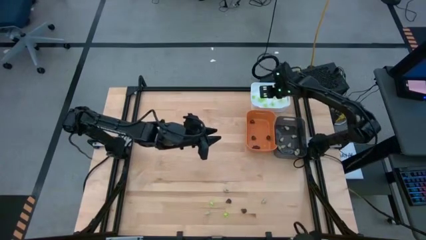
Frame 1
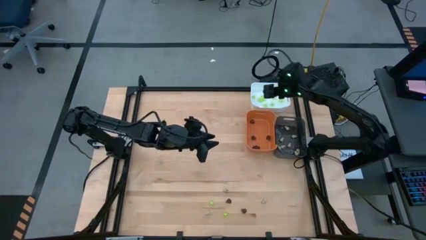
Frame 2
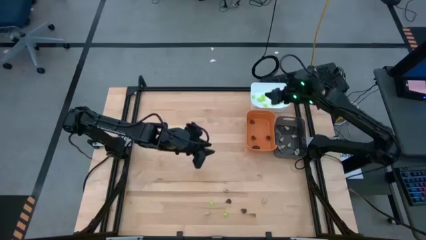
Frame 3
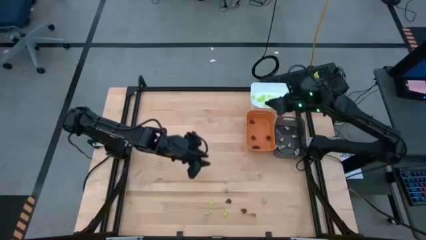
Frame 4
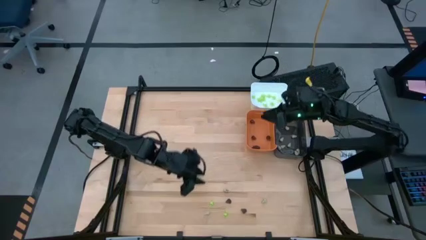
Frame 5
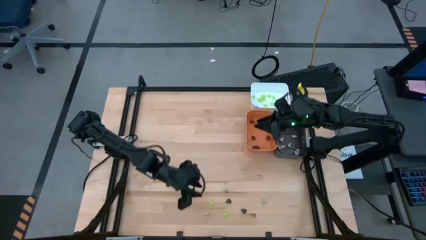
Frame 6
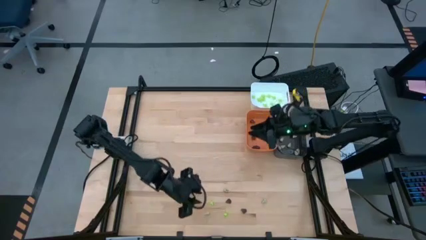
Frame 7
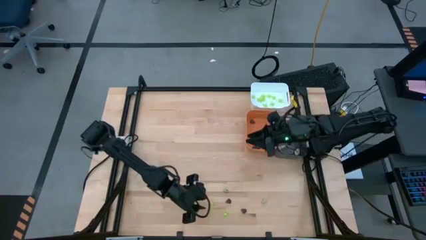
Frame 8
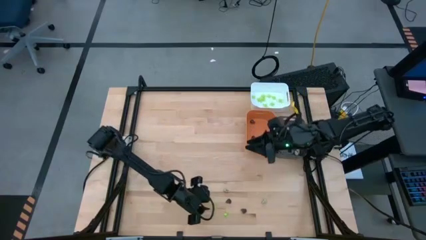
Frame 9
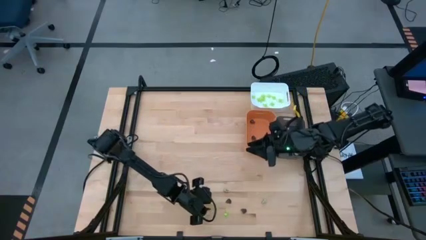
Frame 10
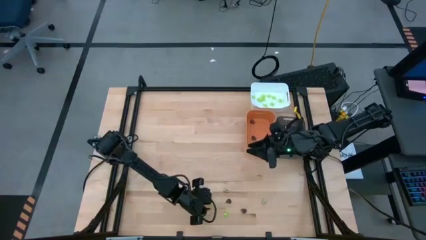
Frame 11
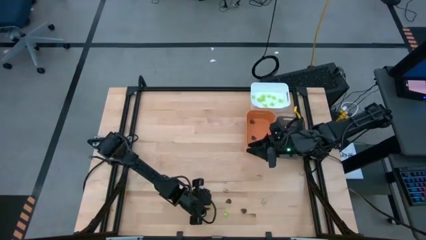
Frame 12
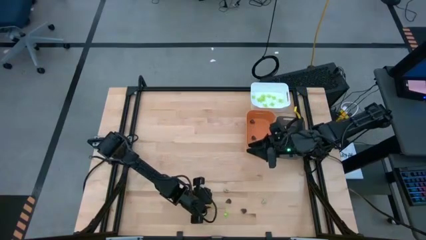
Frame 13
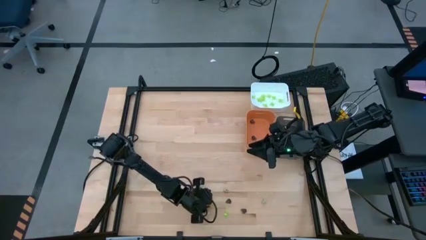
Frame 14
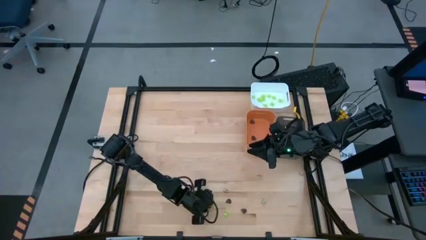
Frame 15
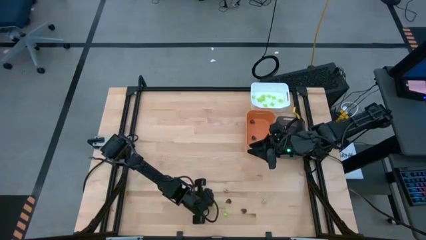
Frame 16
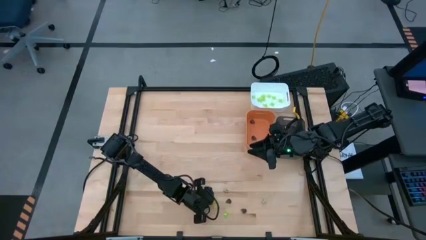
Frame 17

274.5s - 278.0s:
Task: Sort Halloween decoration
Put the green spider toy into the white bin

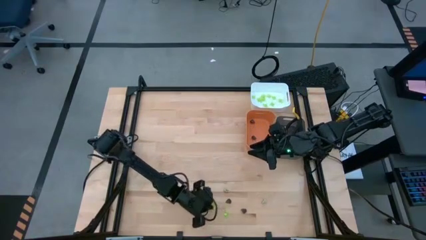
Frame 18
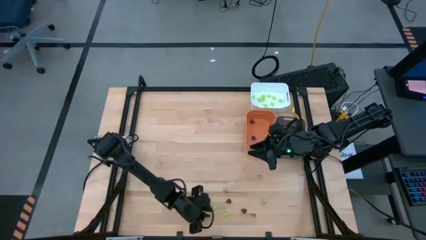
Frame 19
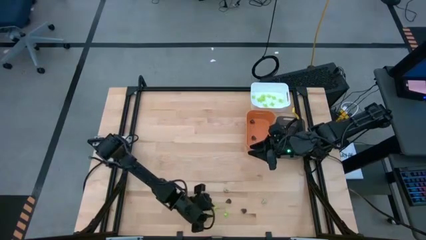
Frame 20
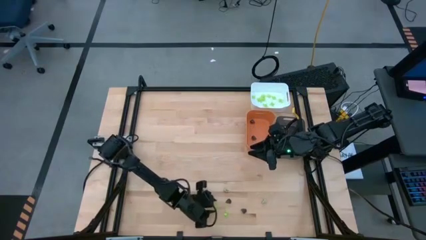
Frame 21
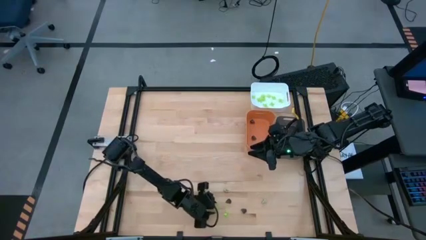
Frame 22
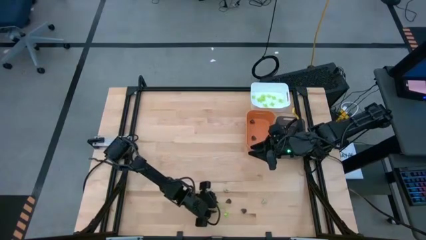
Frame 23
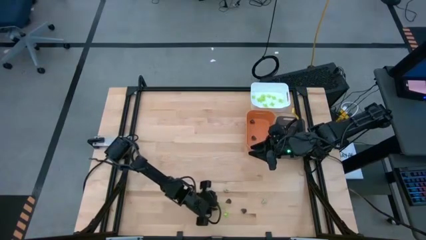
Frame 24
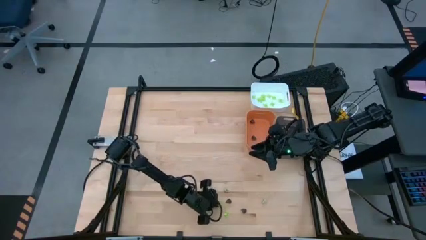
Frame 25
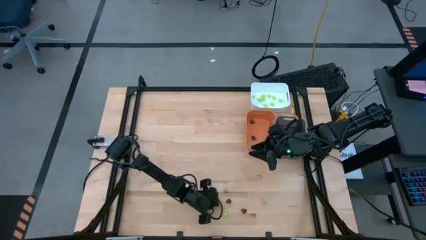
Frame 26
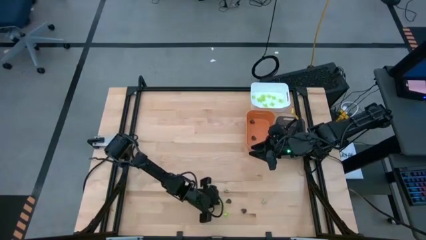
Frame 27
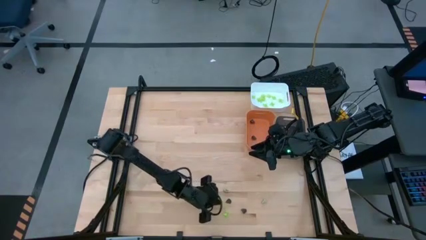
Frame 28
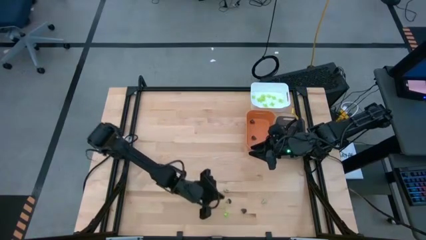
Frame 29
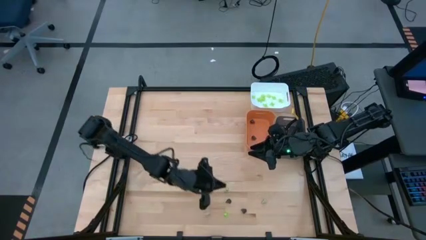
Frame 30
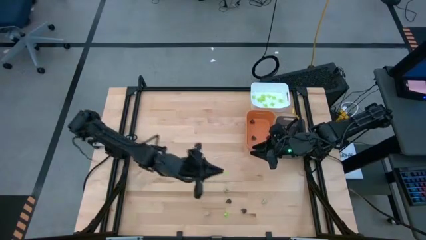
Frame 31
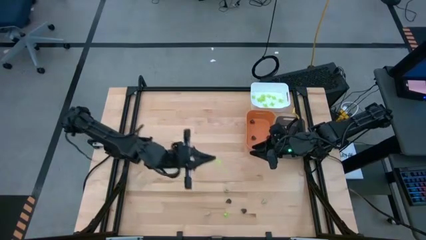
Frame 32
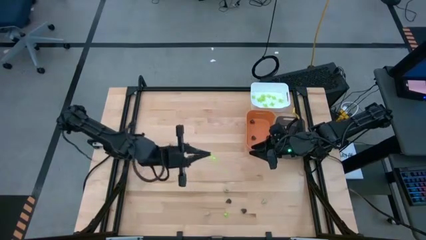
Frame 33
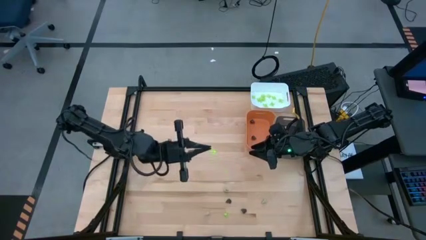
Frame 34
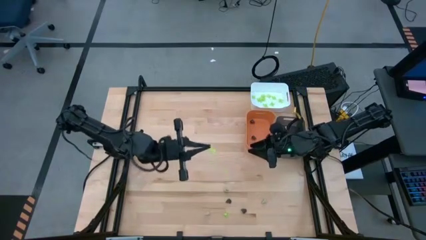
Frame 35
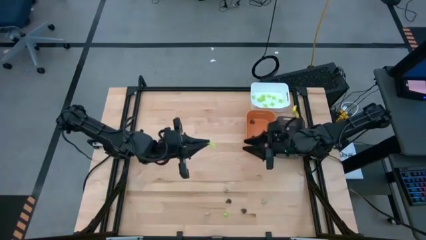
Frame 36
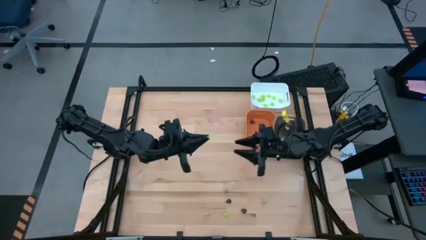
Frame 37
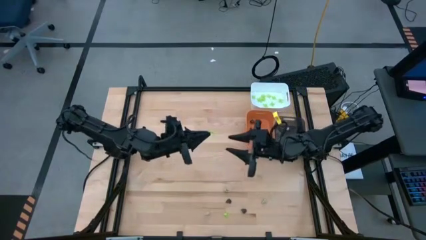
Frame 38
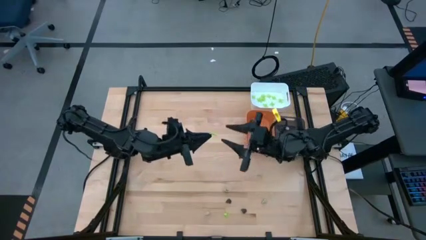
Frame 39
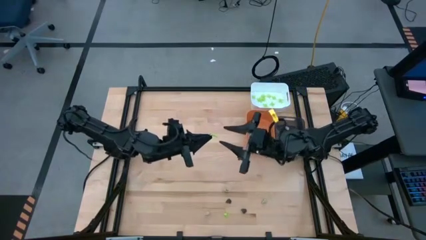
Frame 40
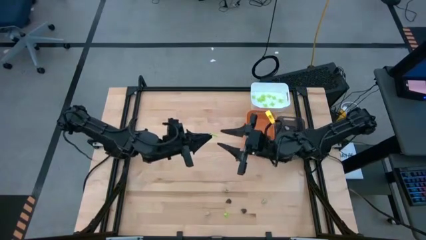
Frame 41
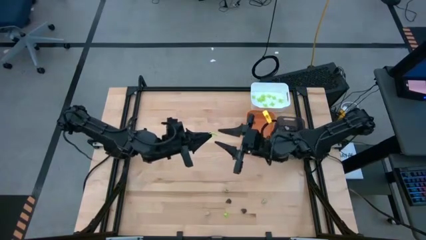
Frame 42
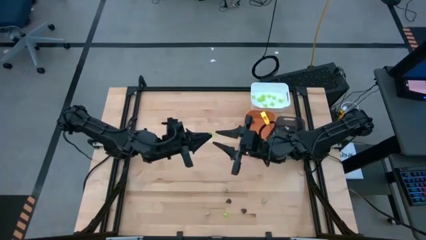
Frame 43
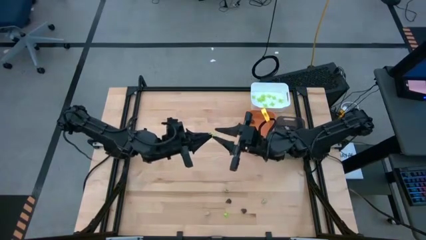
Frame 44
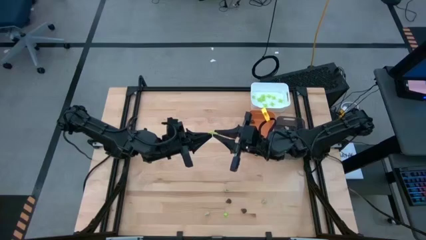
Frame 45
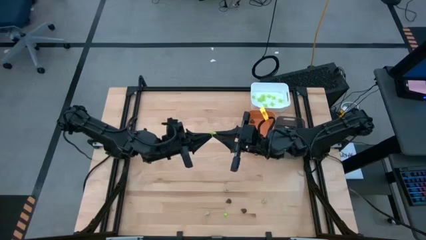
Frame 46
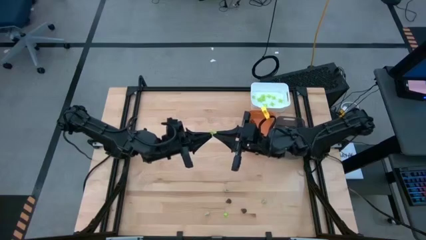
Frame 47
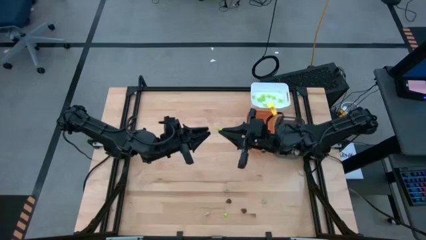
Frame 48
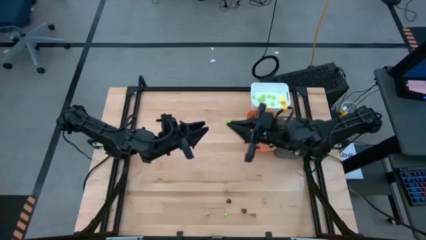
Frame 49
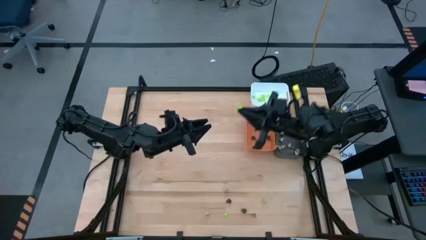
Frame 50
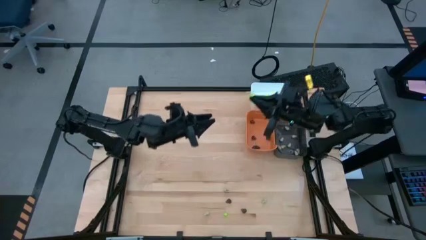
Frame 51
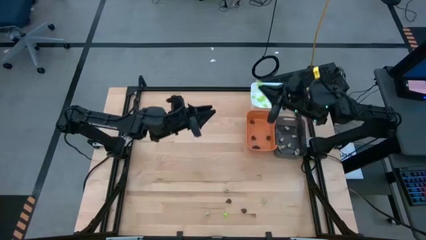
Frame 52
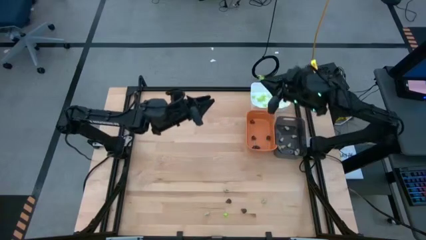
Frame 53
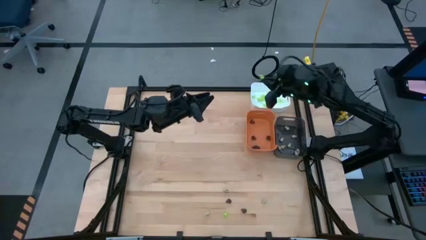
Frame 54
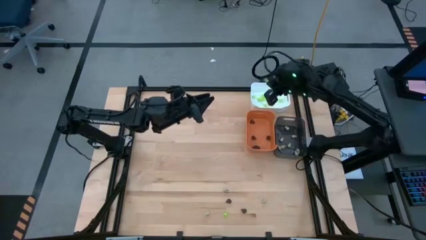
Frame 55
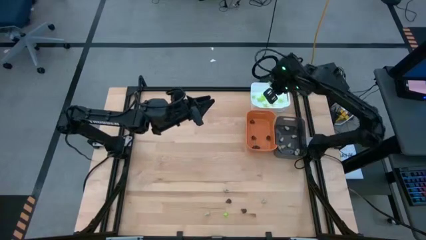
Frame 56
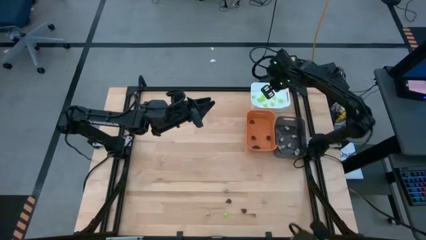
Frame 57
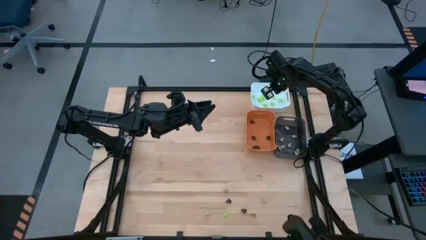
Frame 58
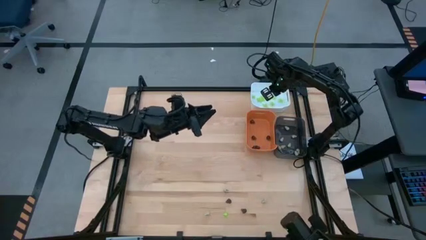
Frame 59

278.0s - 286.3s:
Put the green spider toy into the white bin

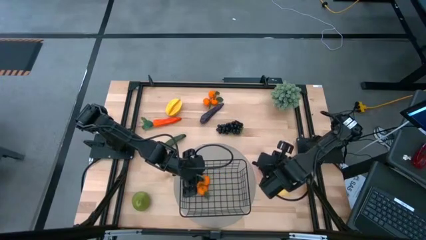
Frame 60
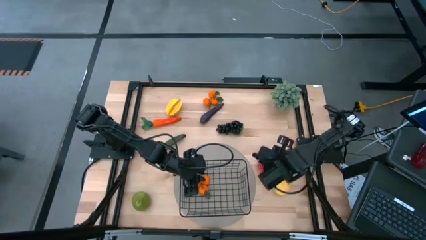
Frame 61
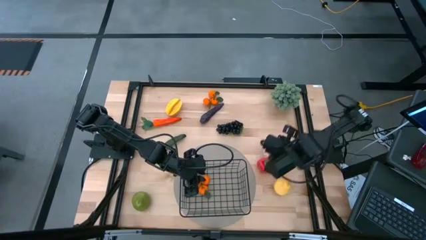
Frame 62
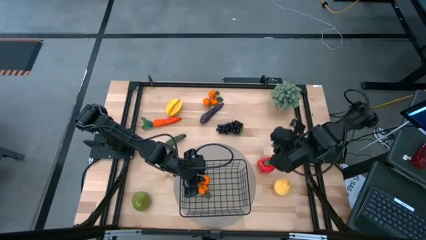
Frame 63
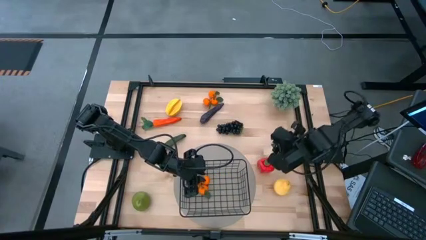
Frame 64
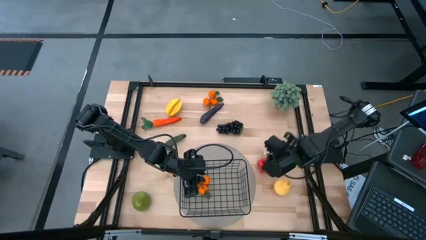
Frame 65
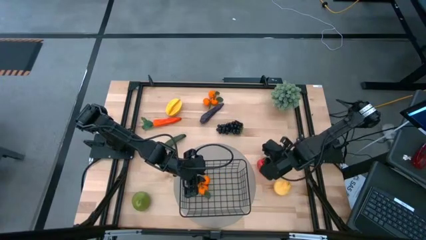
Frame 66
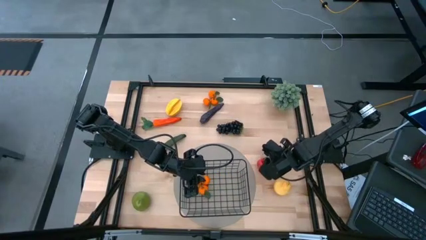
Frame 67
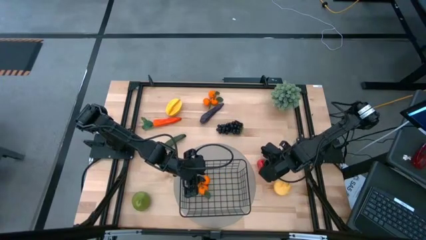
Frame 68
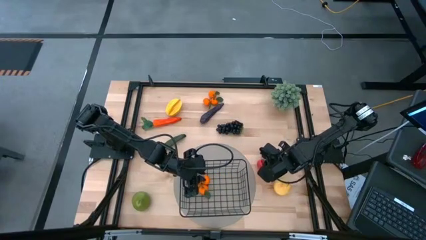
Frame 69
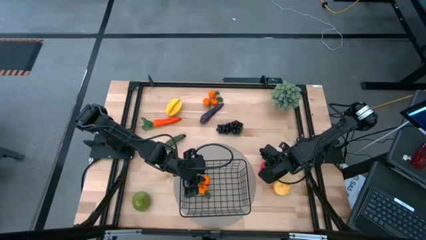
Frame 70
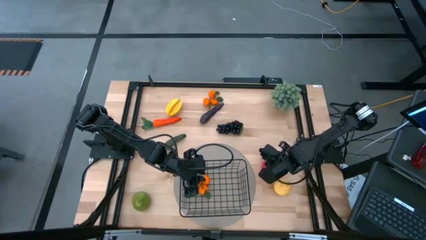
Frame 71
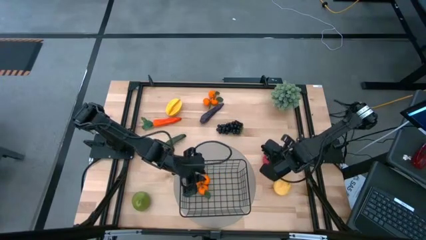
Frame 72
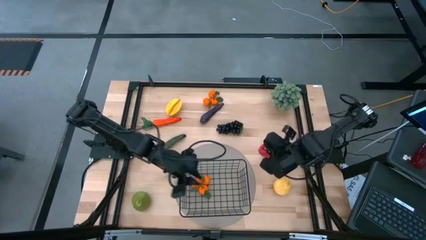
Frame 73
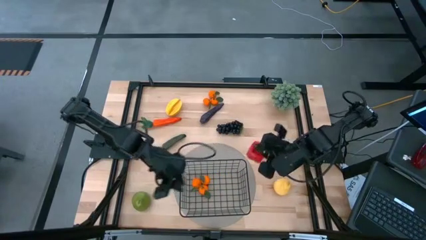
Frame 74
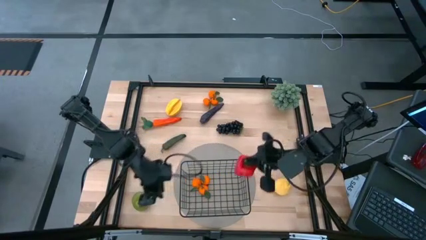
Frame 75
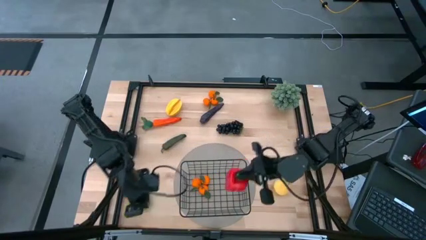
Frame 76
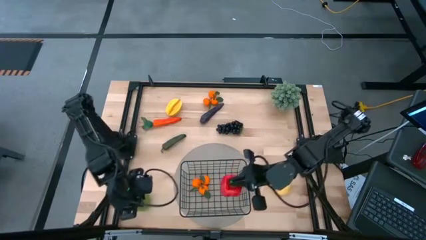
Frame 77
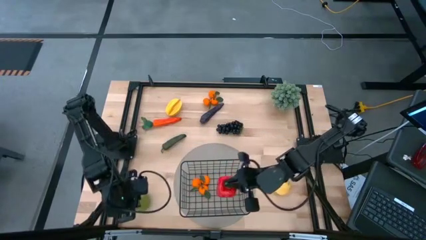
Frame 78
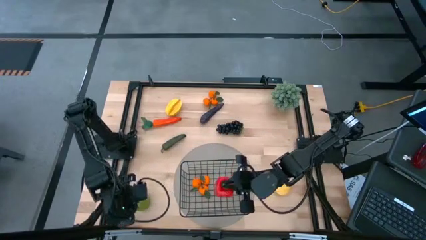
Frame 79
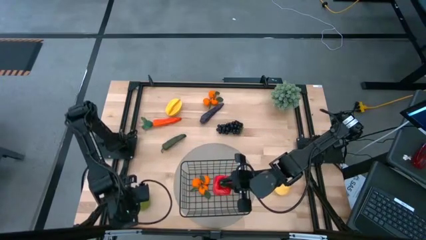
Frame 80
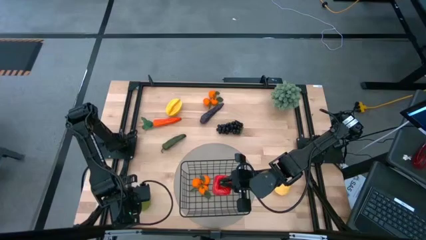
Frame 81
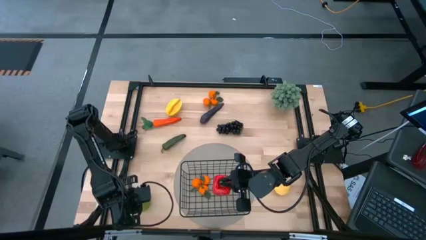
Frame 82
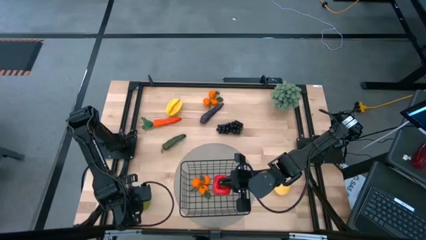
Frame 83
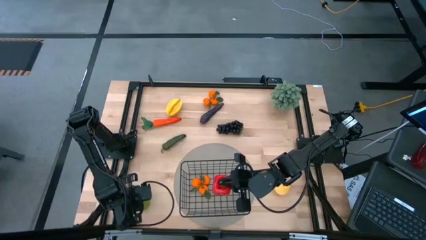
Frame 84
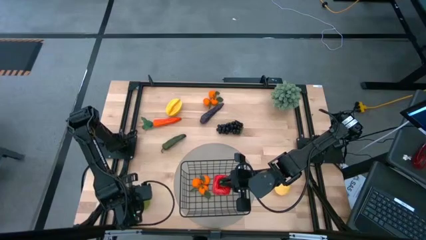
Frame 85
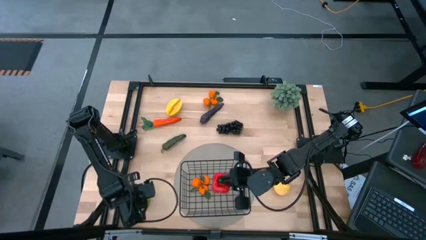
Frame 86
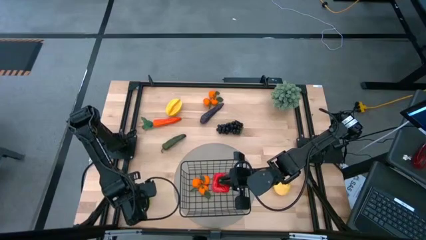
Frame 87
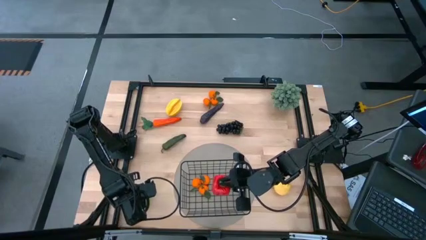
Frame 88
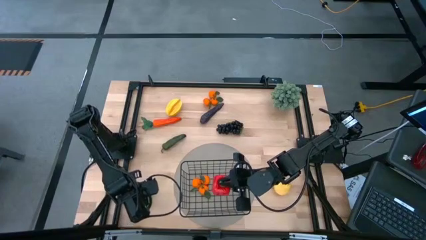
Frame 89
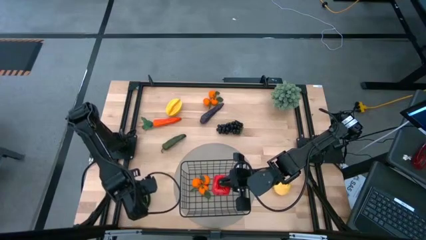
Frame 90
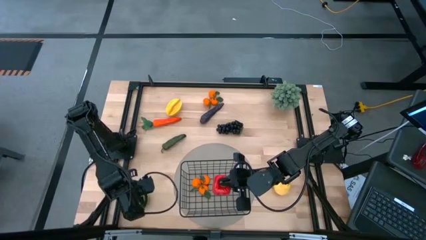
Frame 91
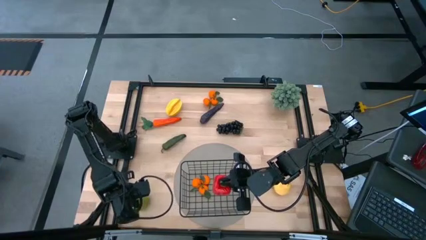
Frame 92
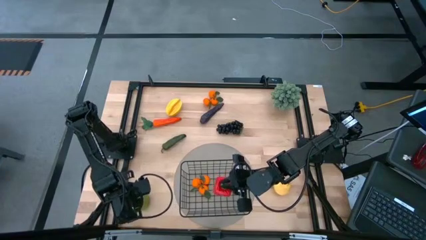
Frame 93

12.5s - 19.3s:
Task: Build produce basket
Put the bell pepper into the black wire basket
